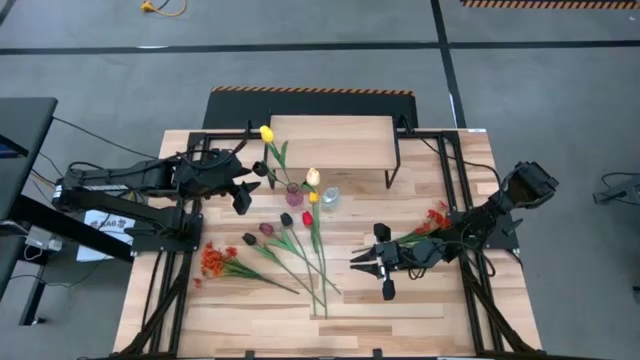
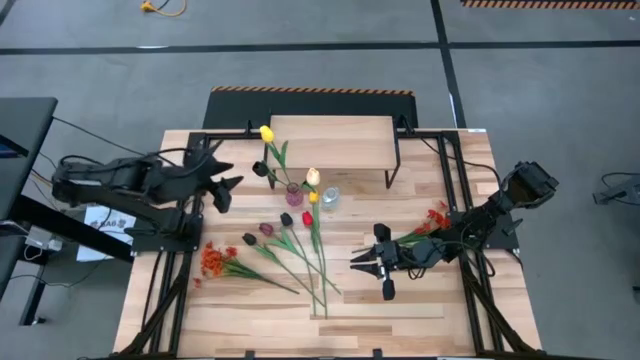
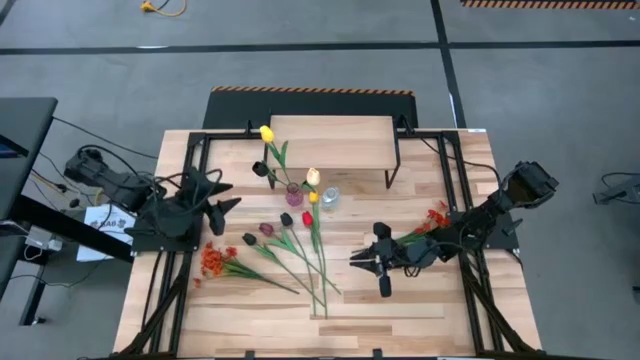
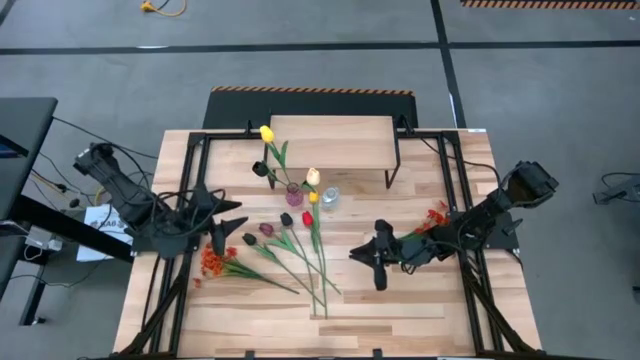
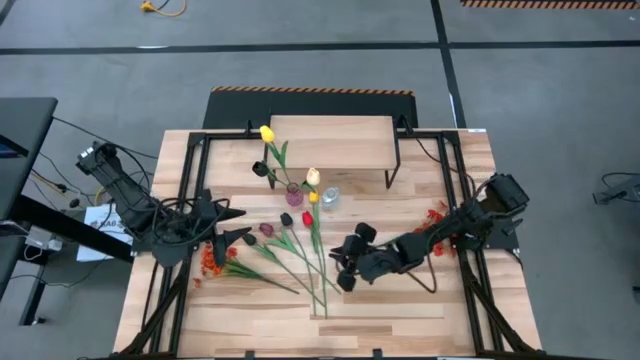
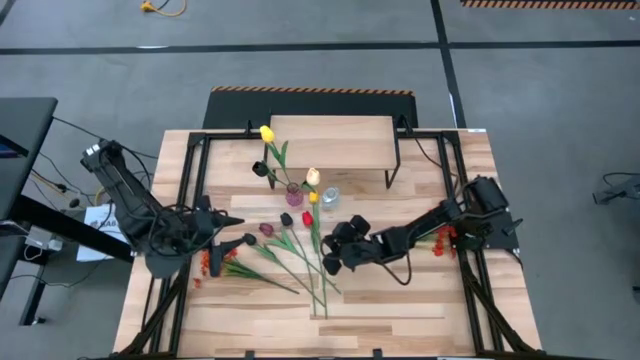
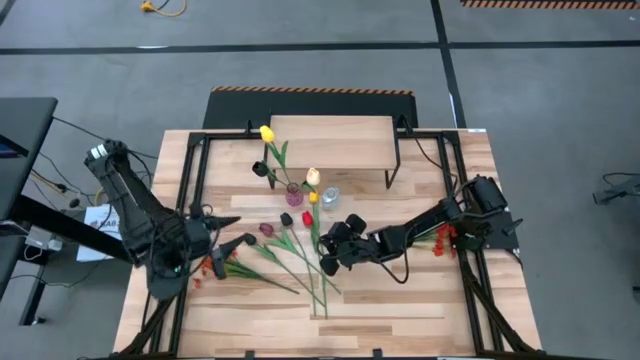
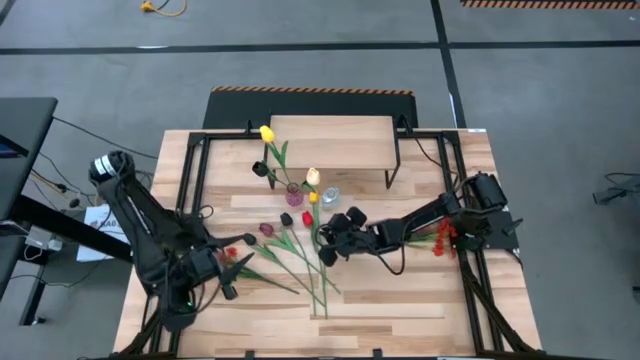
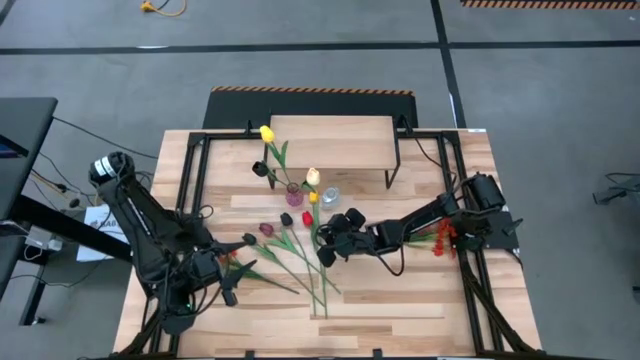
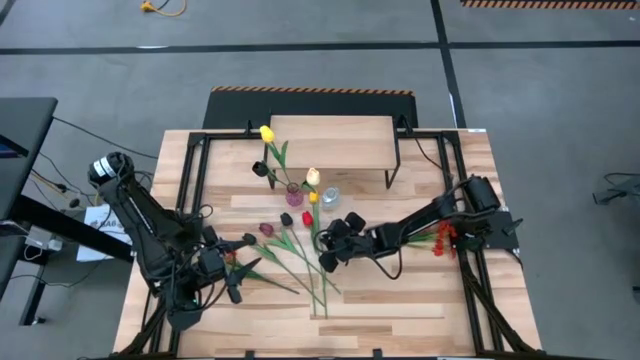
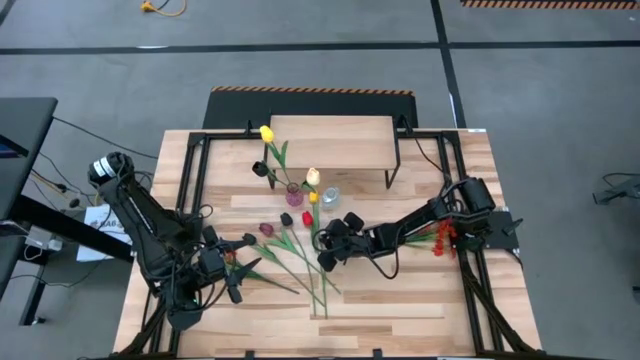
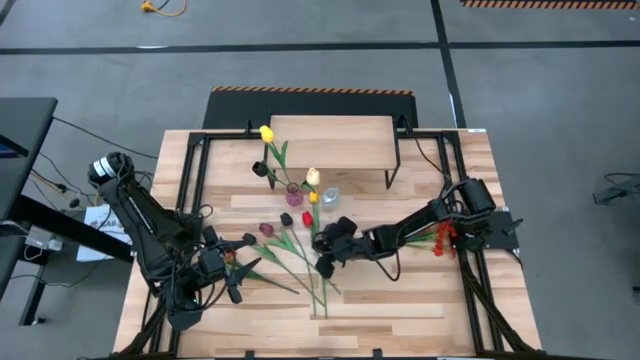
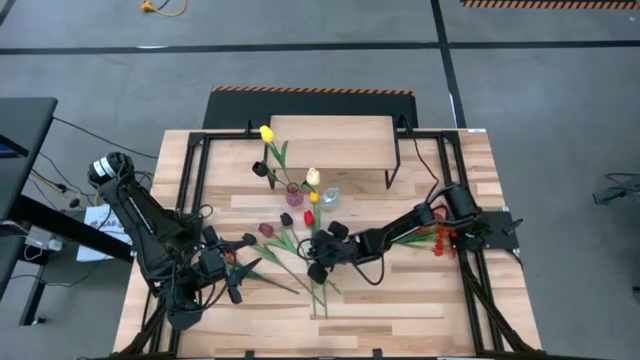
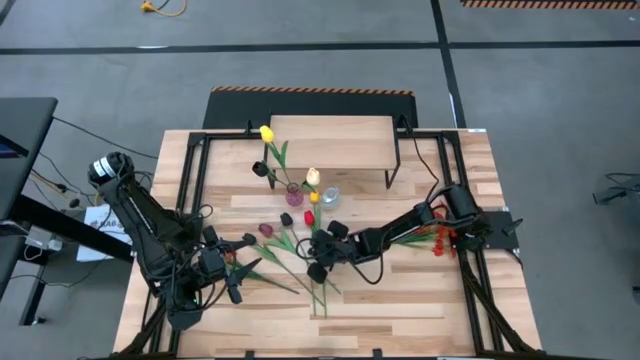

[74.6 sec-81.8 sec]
Task: Pick and place flowers into a vace then onto a shelf
Put the red tulip into the violet vase

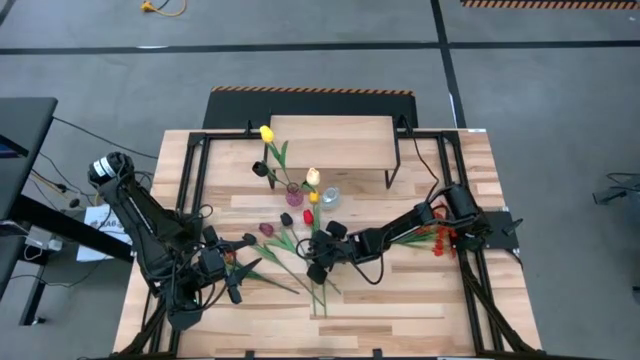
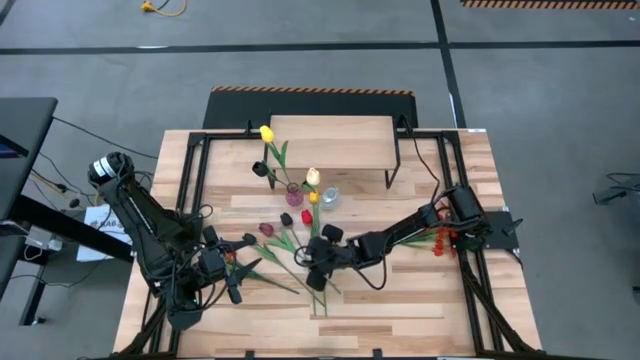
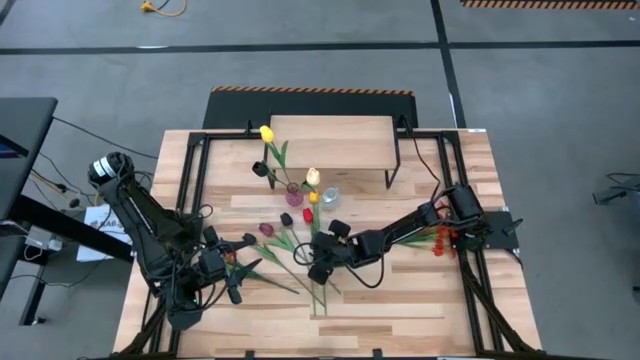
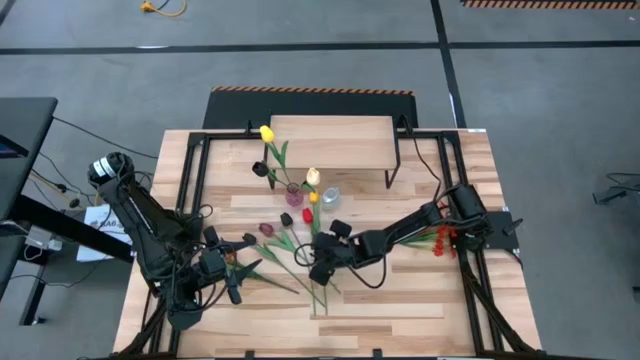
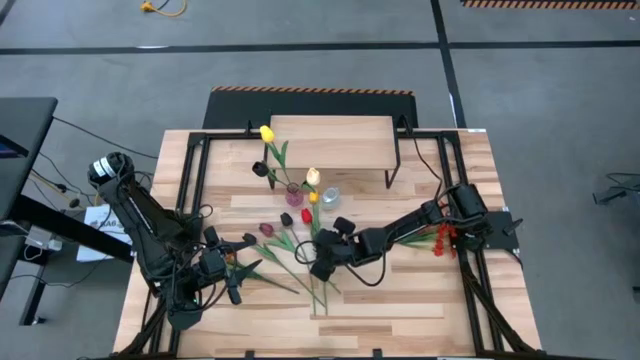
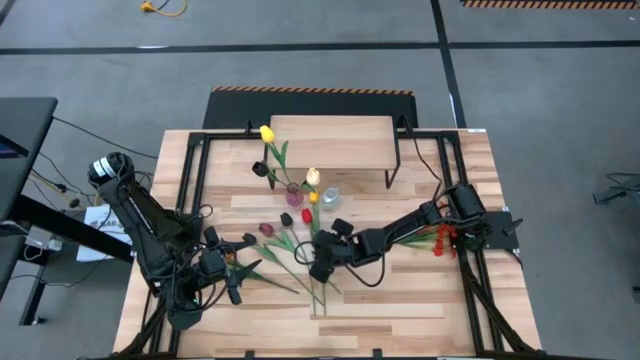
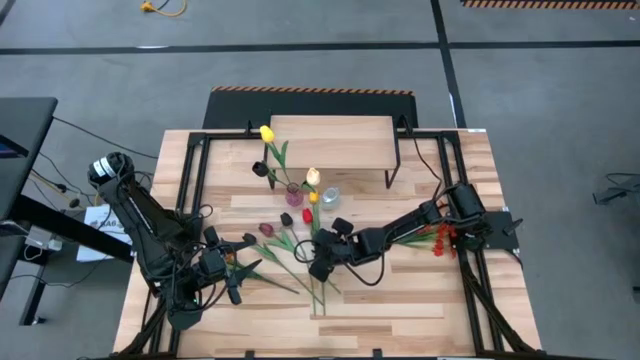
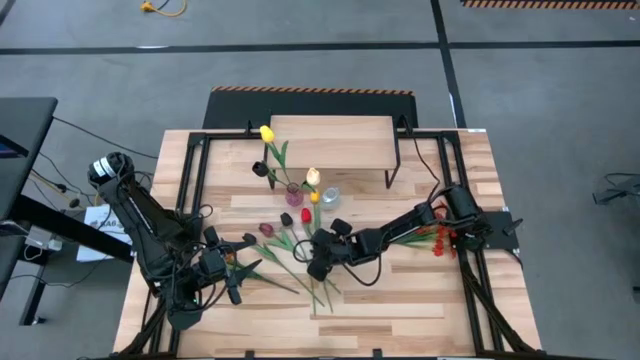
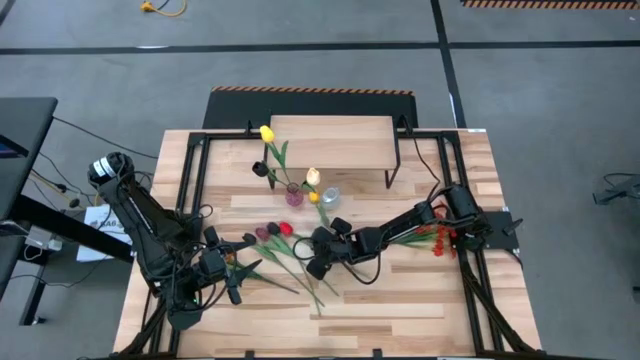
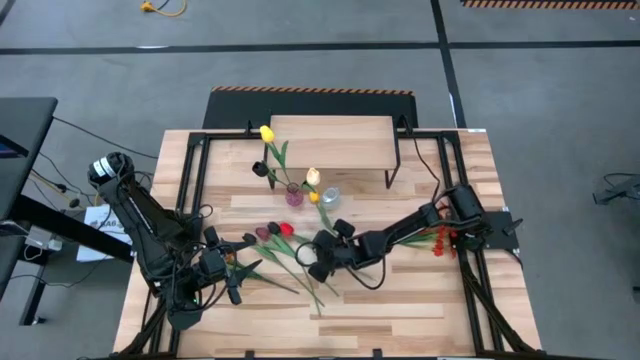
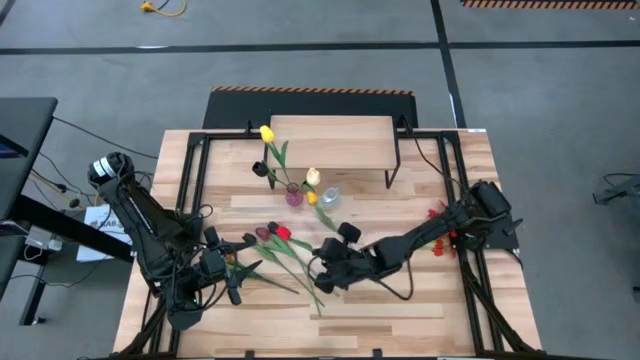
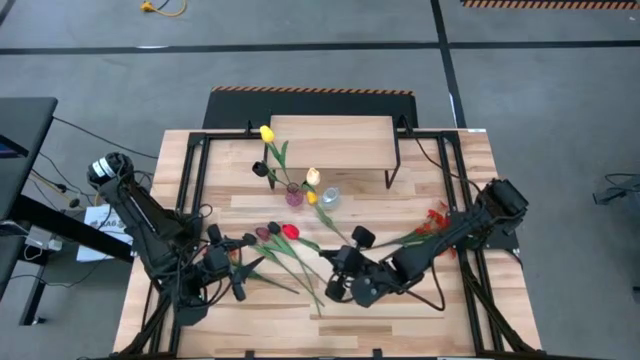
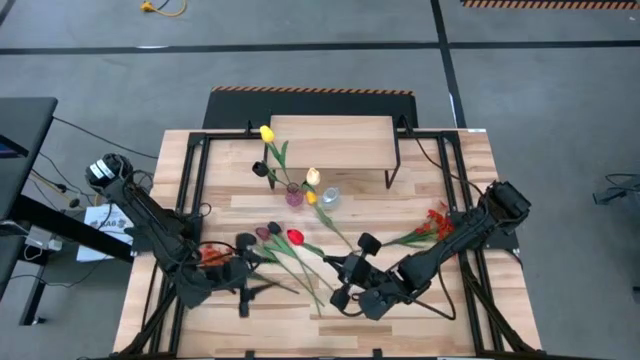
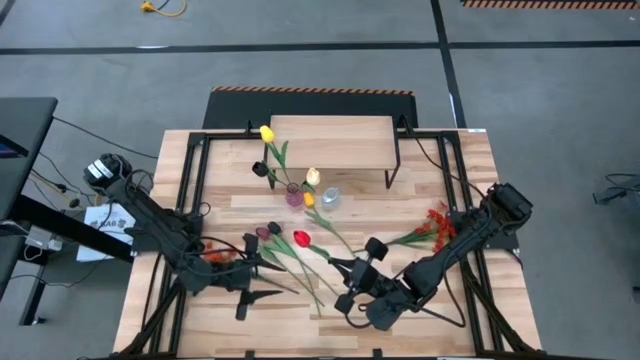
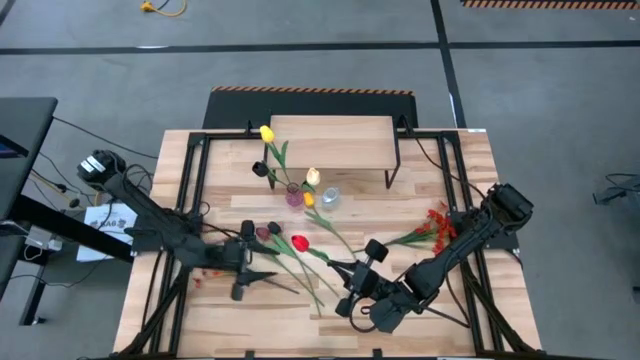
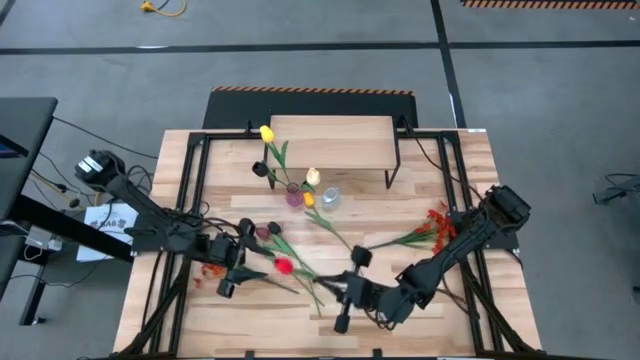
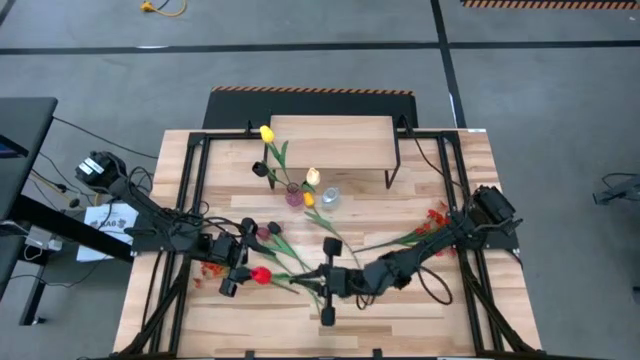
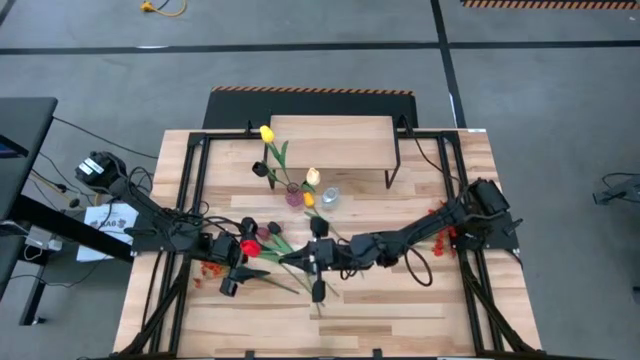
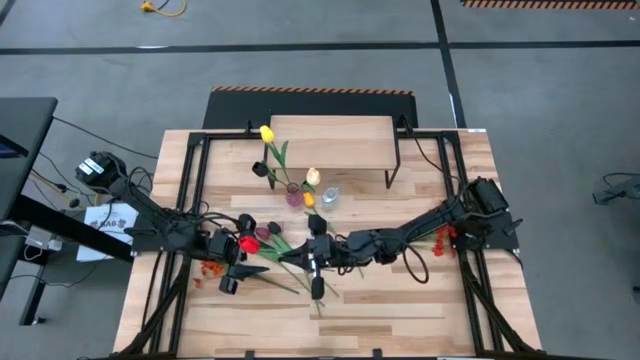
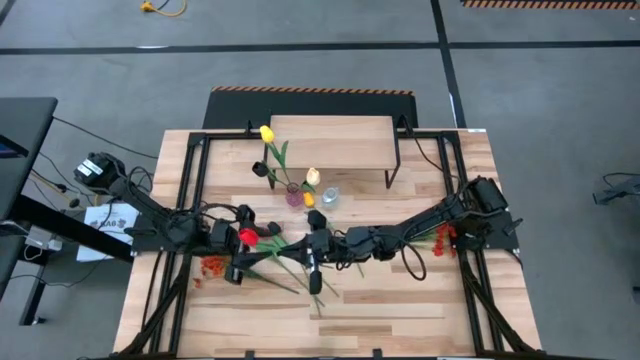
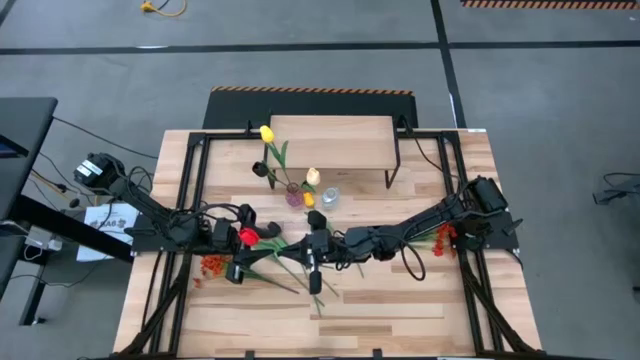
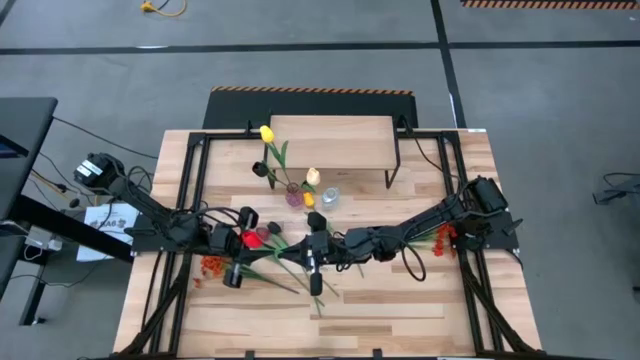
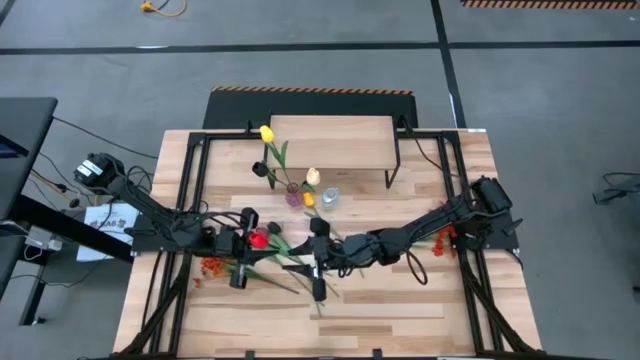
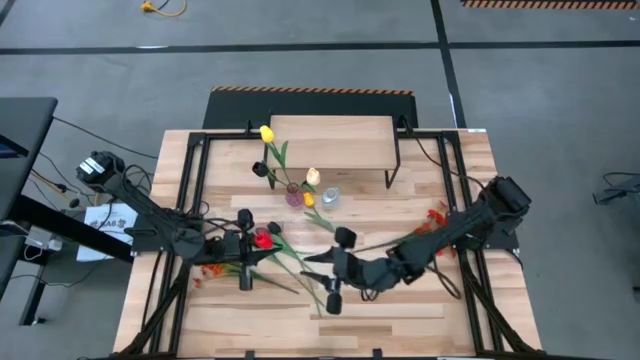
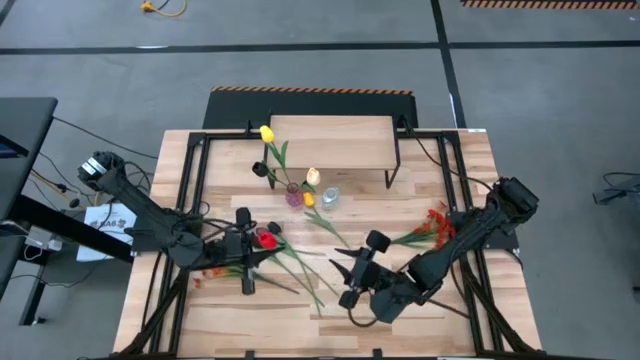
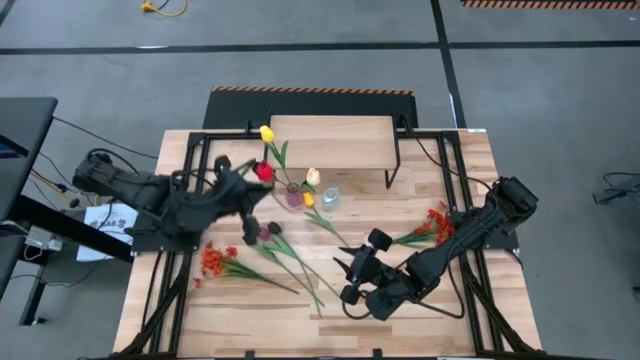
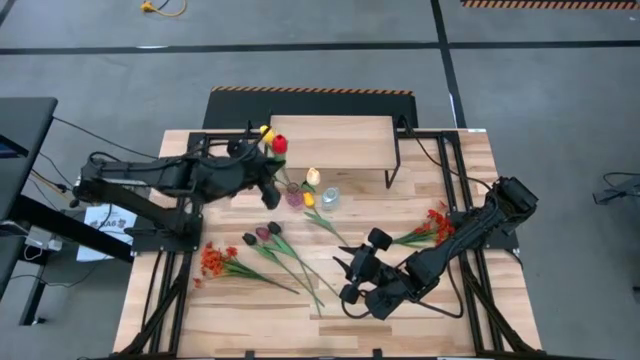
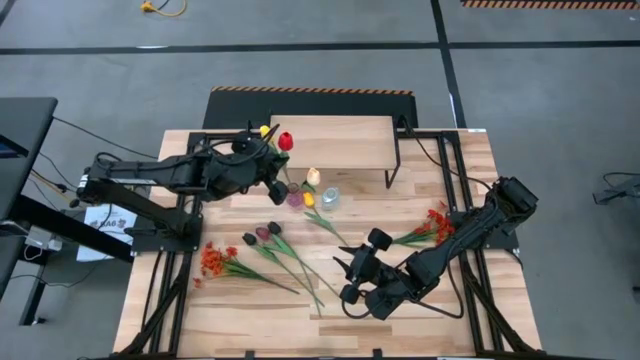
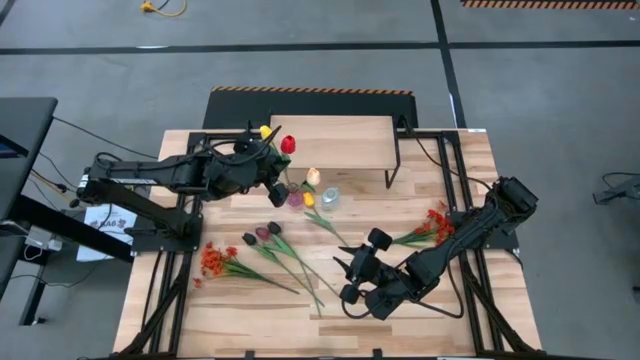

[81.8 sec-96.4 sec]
Put the red tulip into the violet vase
